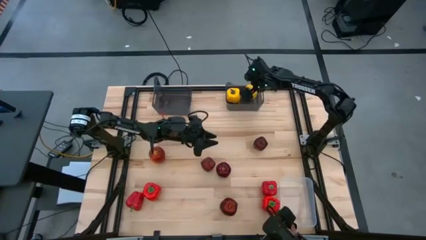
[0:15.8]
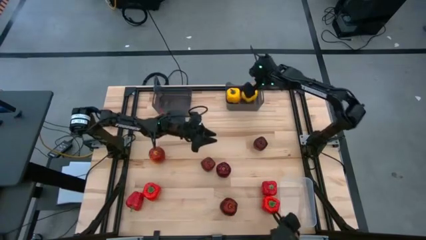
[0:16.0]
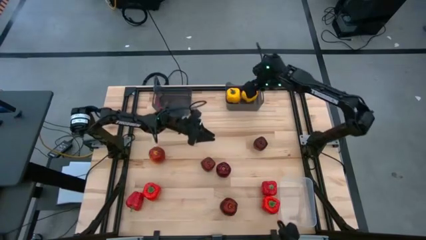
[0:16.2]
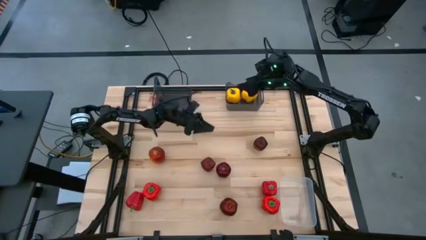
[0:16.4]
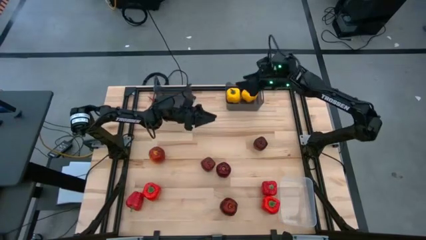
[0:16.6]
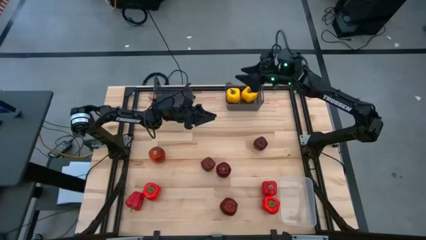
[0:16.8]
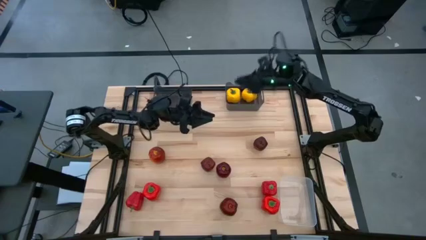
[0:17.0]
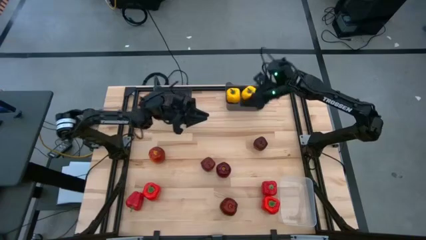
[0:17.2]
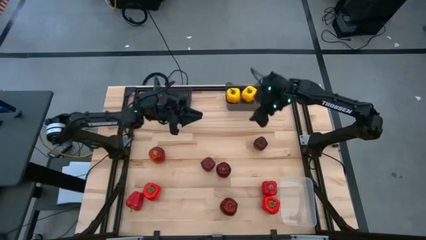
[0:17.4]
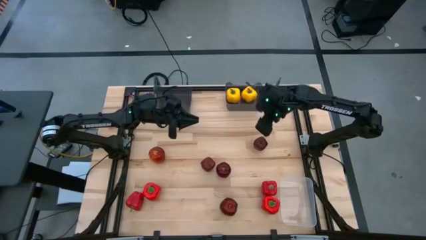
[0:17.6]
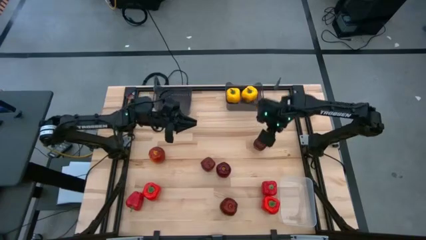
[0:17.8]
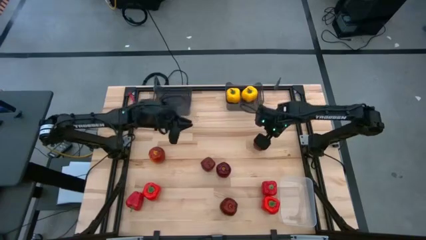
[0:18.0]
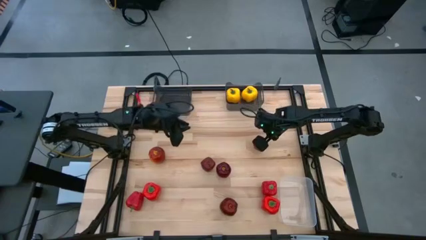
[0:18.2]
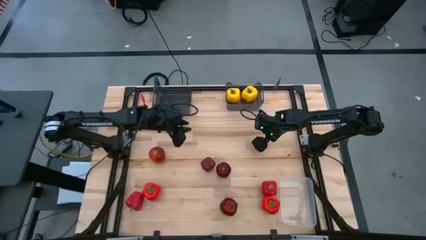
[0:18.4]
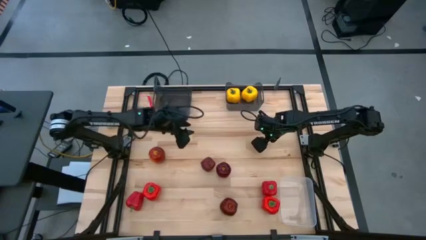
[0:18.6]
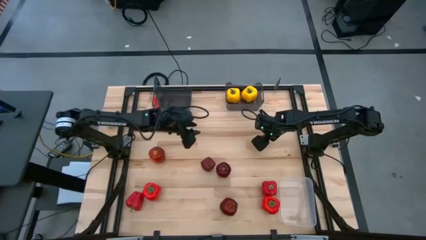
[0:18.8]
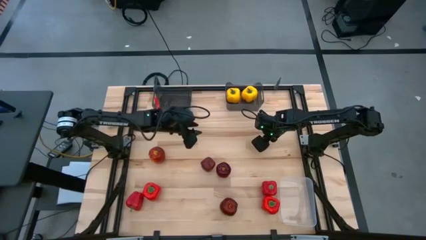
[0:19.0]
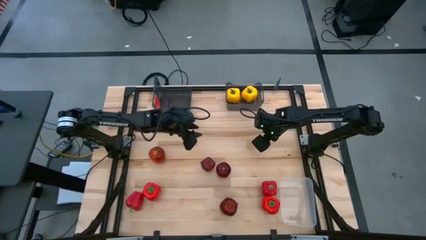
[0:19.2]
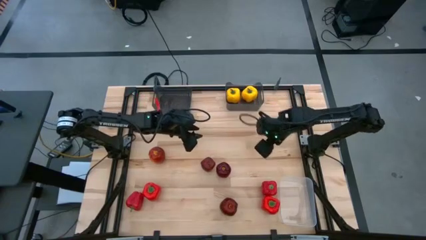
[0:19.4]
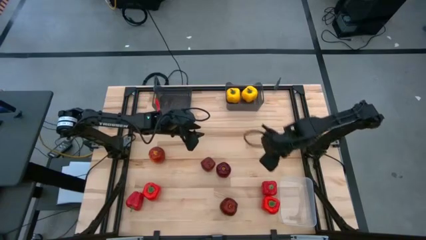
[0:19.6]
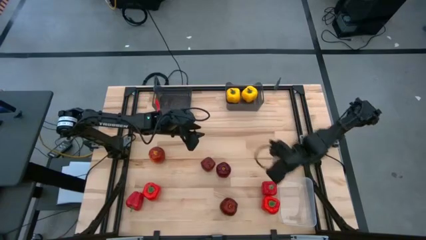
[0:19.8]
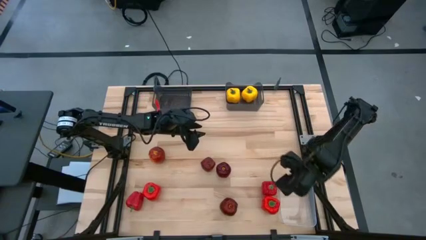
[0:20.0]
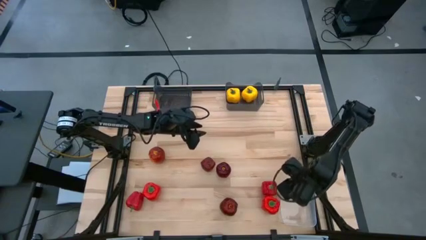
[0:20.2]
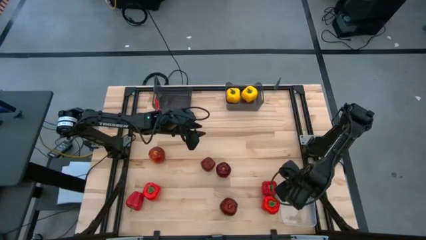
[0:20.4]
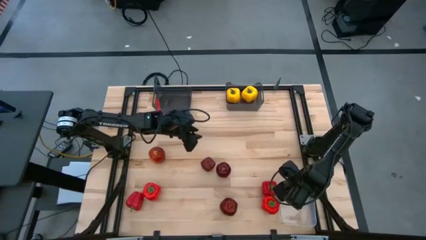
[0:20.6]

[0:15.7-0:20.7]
Task: Sort produce into baskets
Put the red apple into the transparent bin

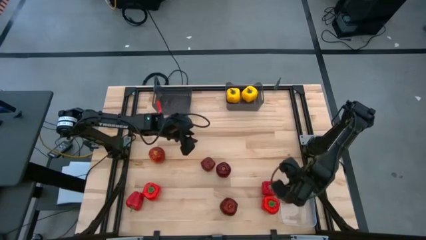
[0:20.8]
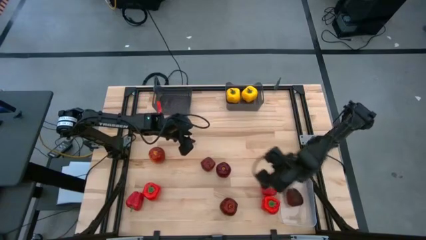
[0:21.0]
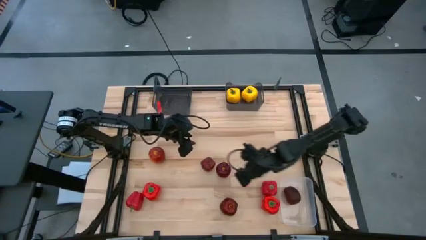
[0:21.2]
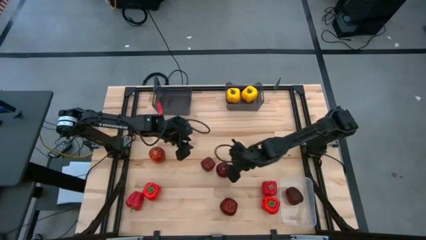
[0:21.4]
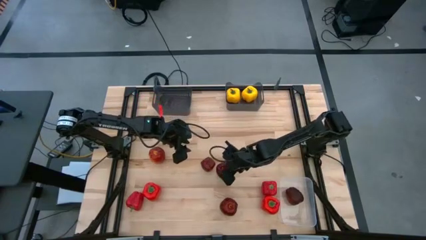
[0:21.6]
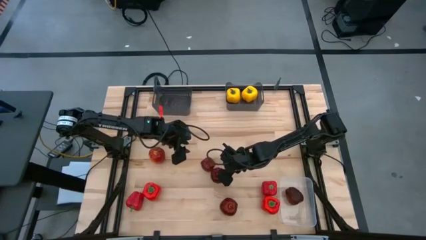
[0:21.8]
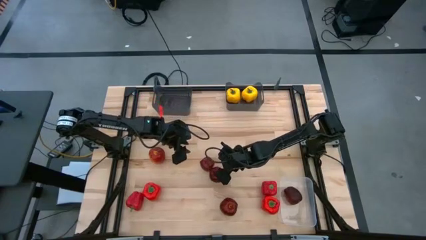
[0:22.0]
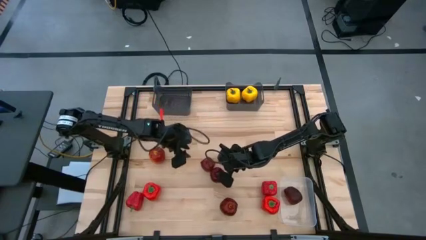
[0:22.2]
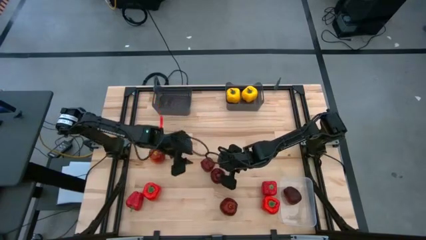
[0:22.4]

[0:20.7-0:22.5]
Put the red apple into the transparent bin

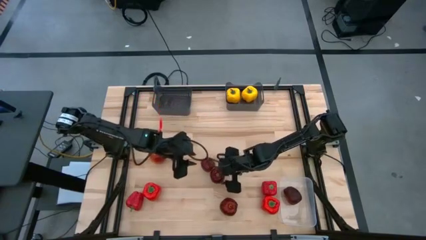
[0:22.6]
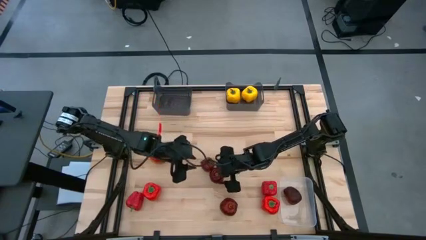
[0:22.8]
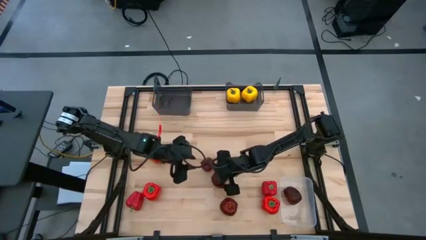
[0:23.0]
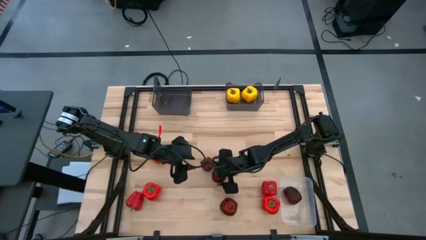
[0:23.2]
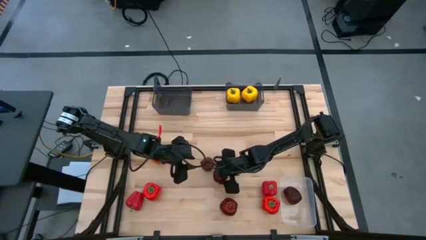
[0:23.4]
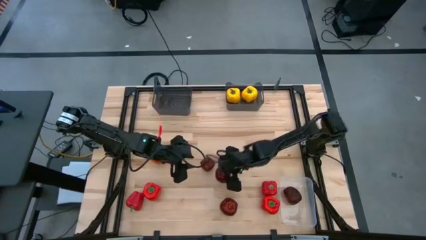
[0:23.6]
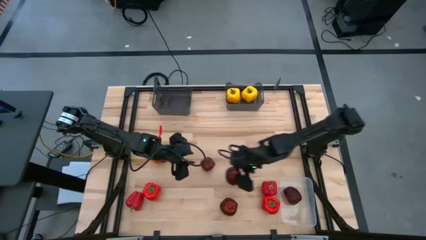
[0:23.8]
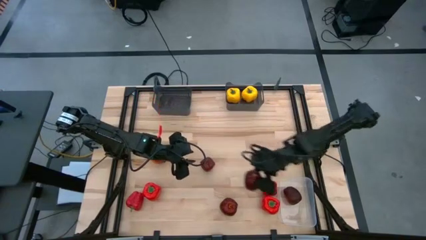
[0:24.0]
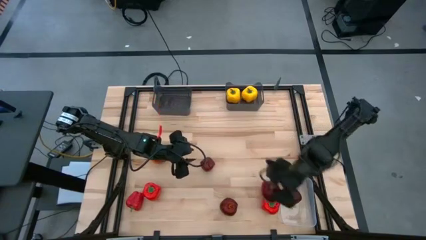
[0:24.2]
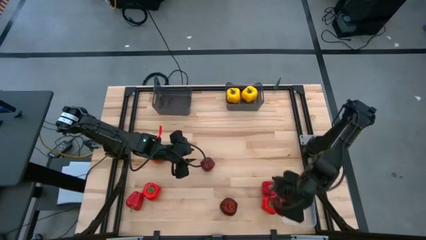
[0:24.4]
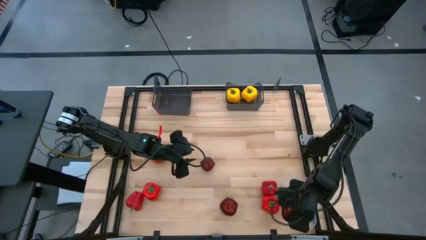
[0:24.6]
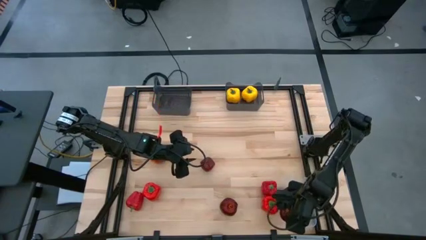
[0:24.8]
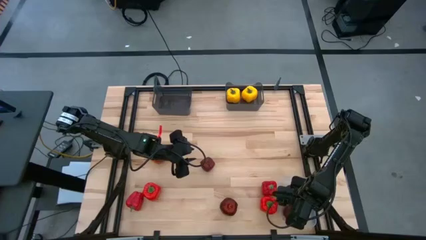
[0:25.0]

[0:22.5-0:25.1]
Put the red apple into the transparent bin

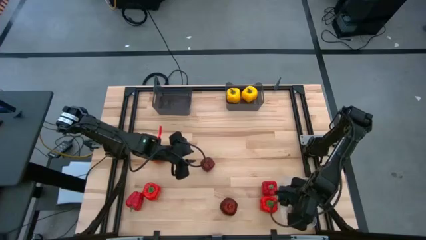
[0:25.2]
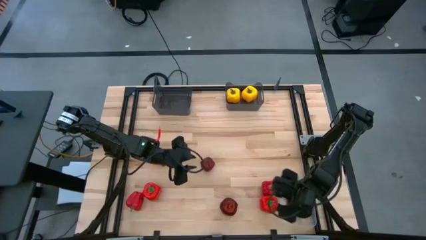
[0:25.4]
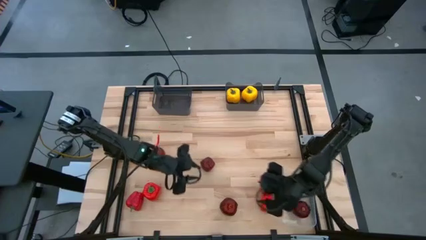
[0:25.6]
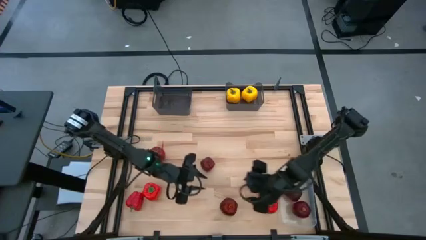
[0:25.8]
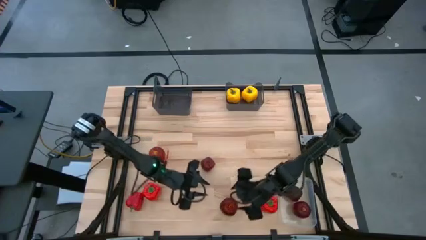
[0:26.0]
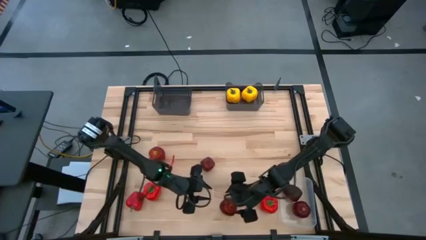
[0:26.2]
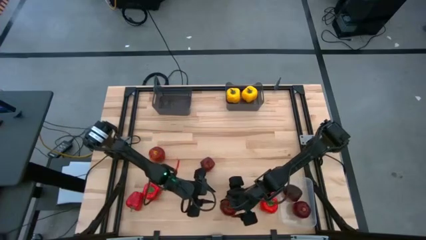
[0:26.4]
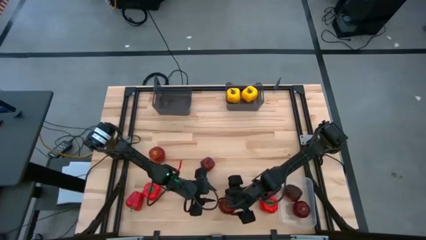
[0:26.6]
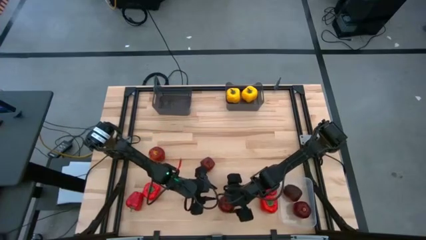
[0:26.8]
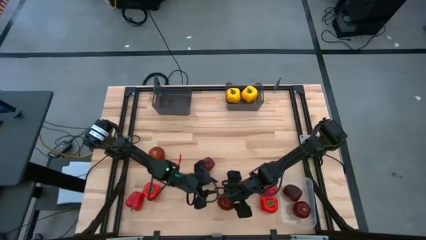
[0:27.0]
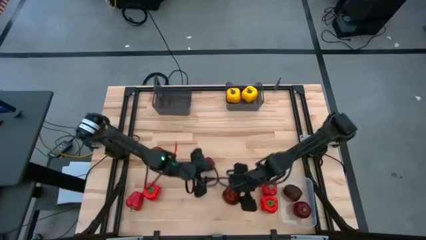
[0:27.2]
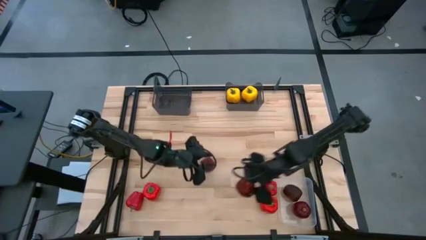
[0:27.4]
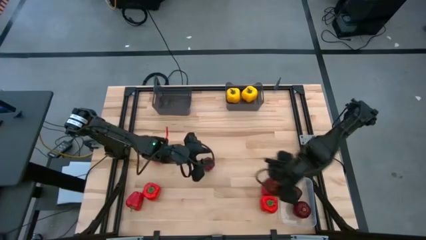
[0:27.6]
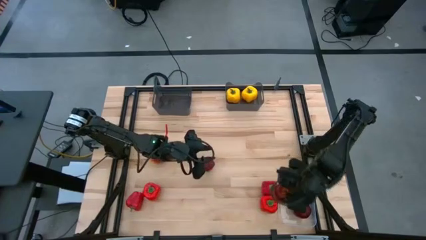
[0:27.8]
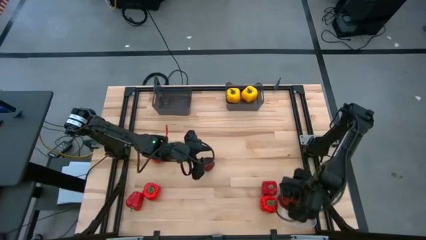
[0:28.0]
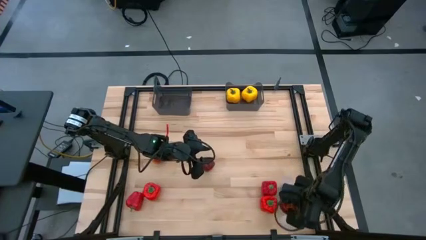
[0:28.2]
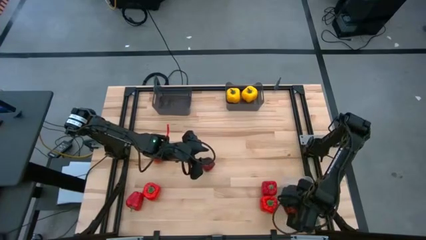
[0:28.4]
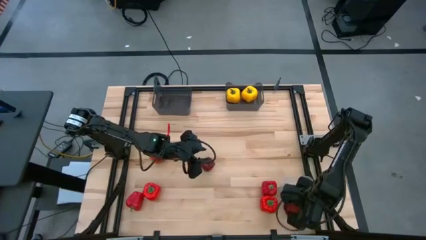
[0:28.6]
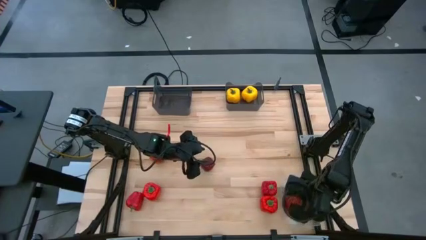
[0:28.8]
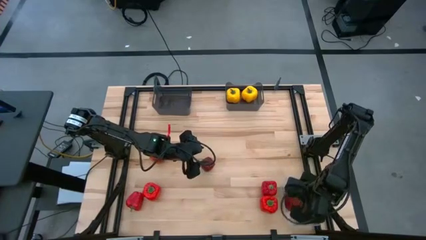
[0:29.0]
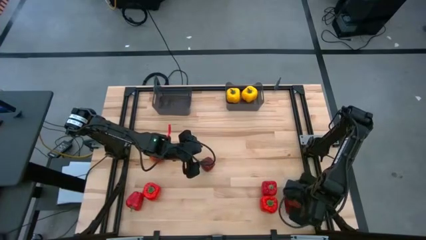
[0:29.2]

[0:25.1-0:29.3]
Put the red apple into the transparent bin

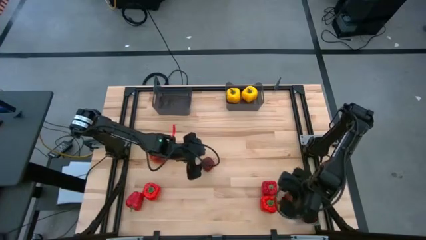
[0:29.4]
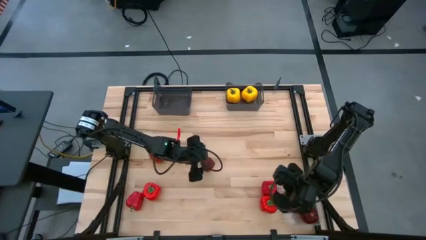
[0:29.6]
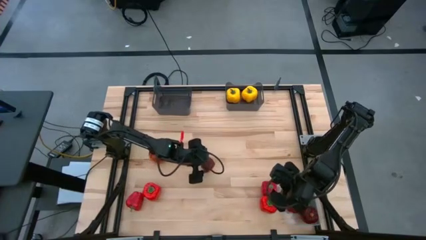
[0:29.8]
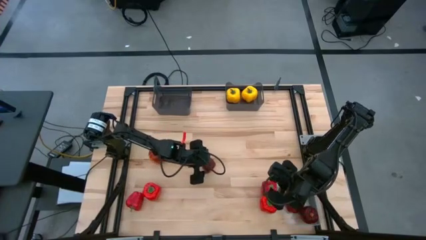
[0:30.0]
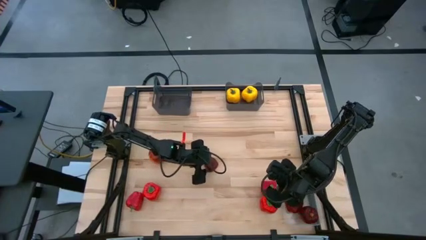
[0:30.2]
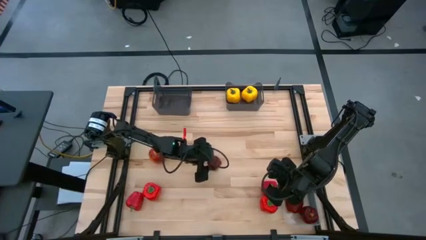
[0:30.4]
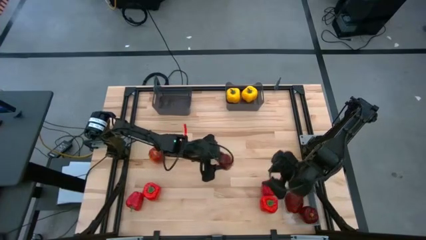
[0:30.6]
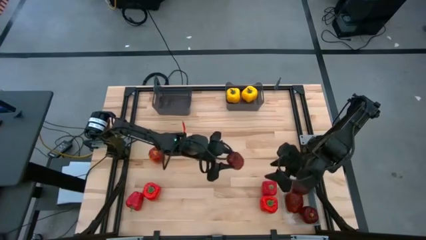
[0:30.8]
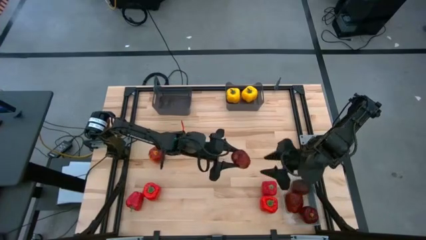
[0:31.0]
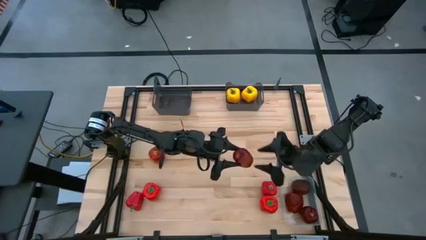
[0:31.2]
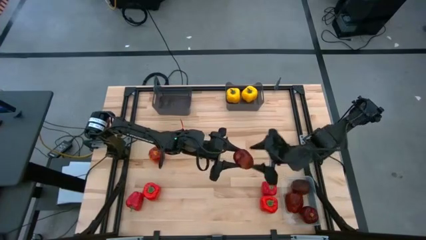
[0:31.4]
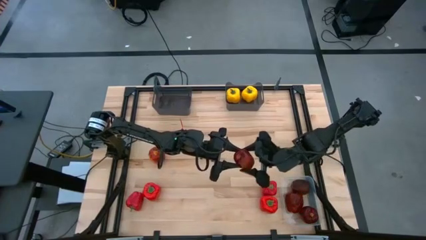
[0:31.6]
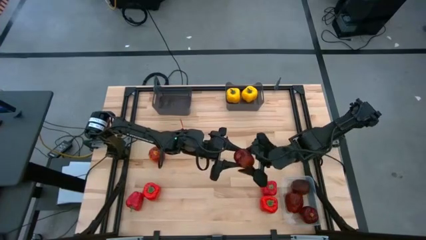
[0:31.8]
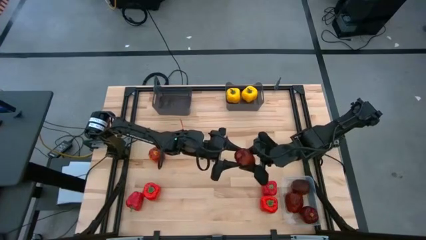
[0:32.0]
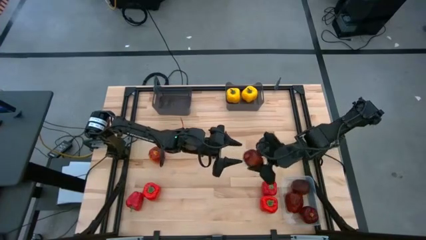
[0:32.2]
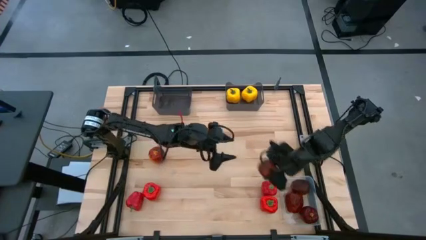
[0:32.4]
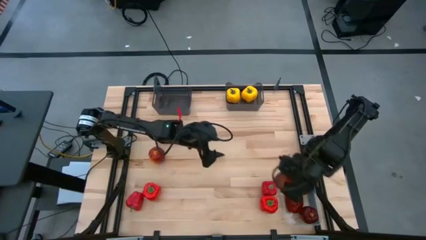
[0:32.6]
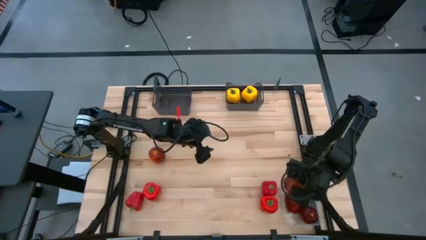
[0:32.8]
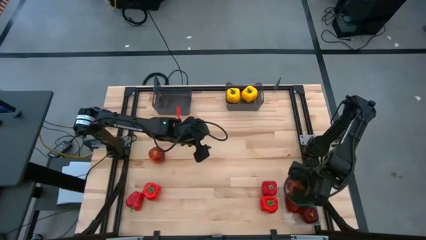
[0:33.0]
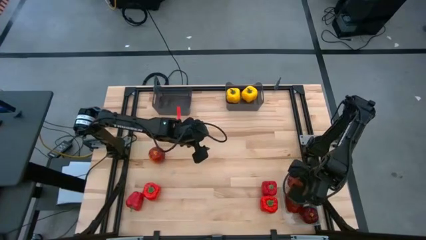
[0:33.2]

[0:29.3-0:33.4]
Put the red apple into the transparent bin
